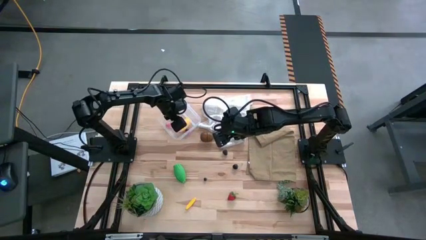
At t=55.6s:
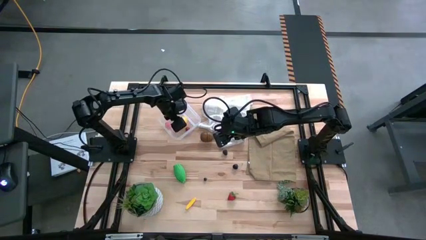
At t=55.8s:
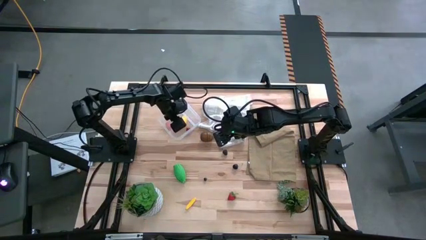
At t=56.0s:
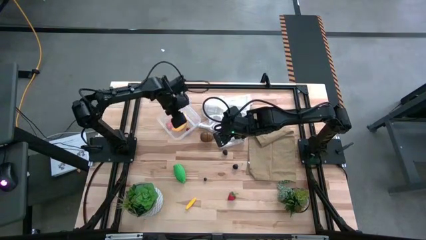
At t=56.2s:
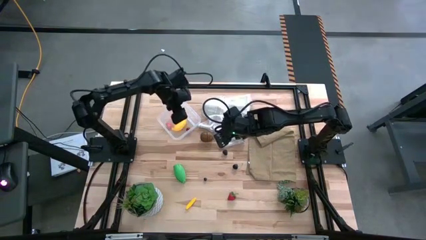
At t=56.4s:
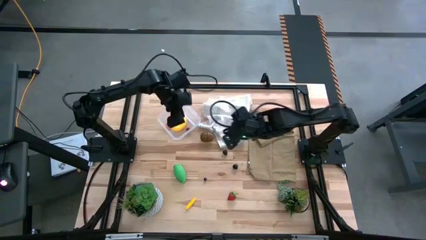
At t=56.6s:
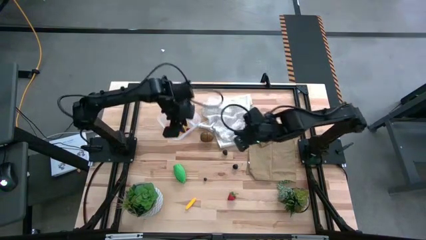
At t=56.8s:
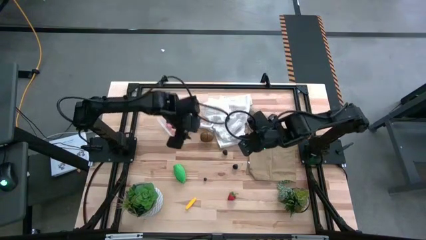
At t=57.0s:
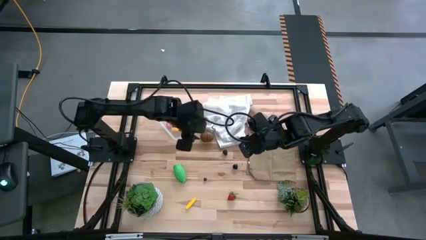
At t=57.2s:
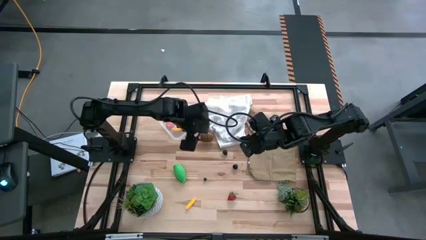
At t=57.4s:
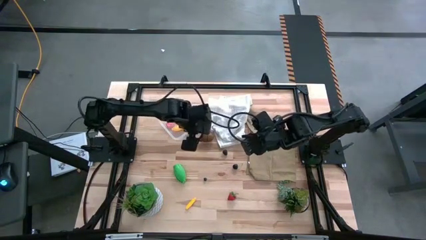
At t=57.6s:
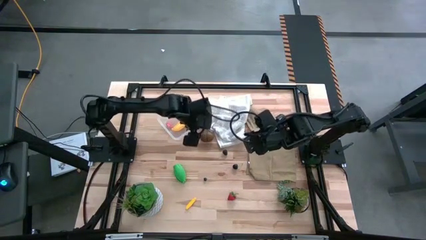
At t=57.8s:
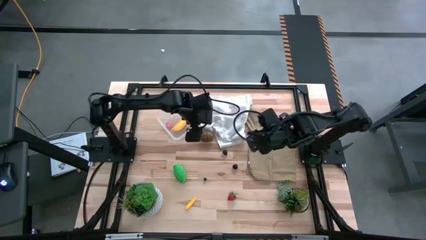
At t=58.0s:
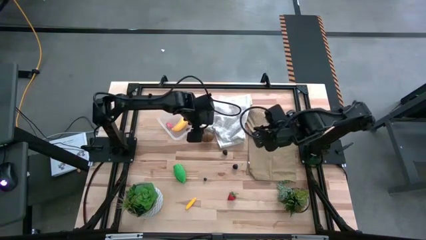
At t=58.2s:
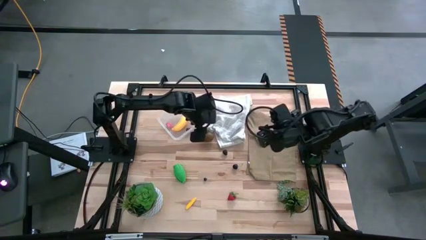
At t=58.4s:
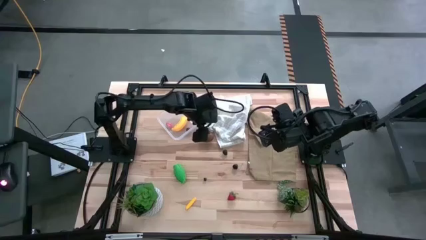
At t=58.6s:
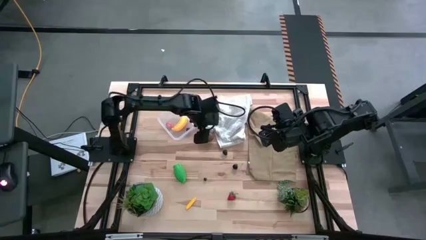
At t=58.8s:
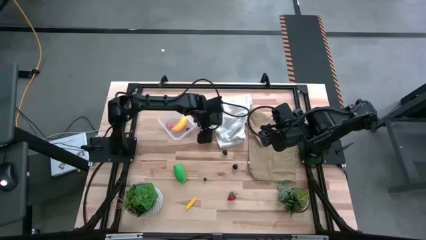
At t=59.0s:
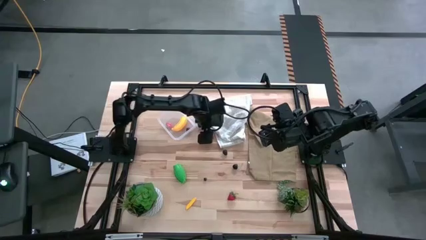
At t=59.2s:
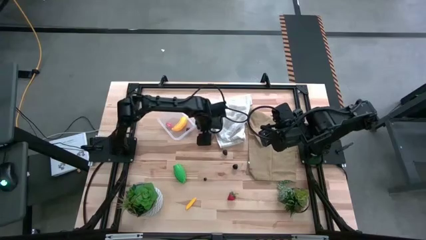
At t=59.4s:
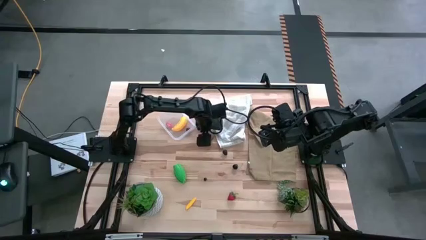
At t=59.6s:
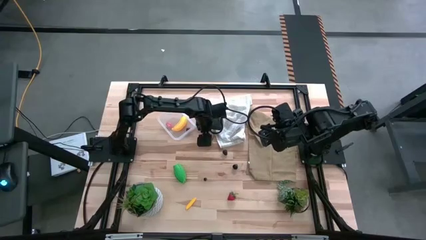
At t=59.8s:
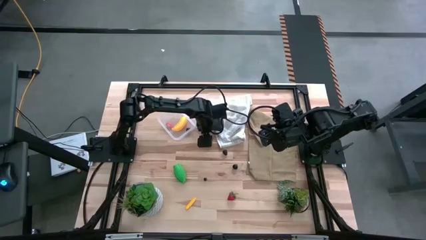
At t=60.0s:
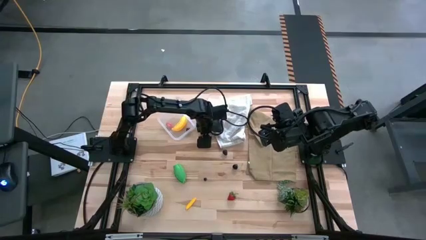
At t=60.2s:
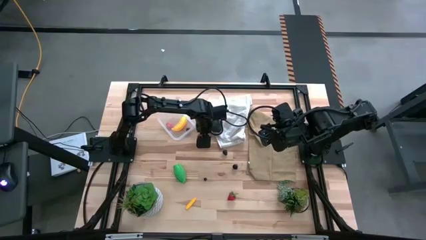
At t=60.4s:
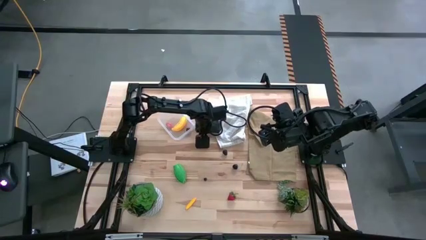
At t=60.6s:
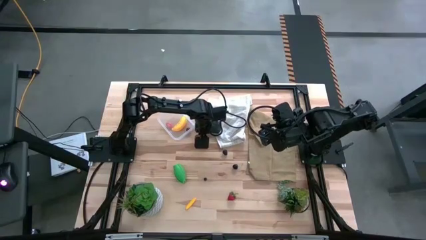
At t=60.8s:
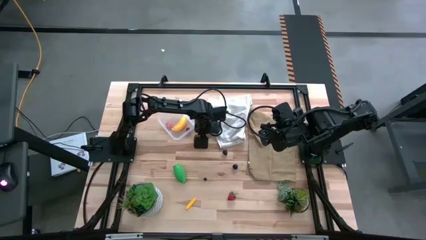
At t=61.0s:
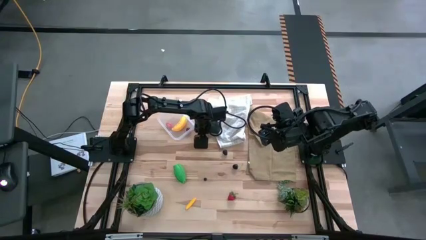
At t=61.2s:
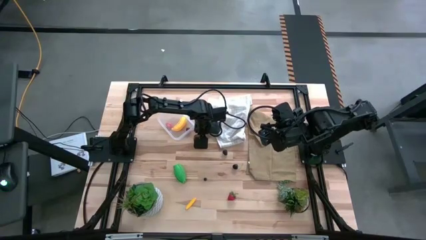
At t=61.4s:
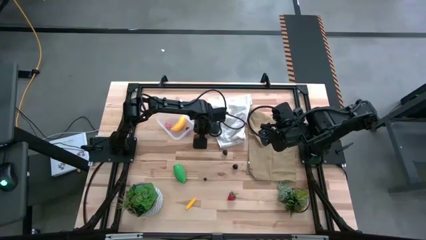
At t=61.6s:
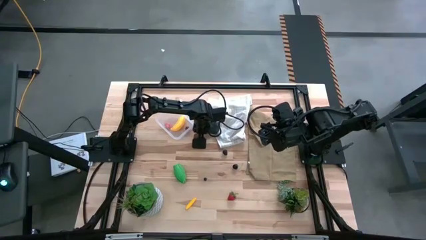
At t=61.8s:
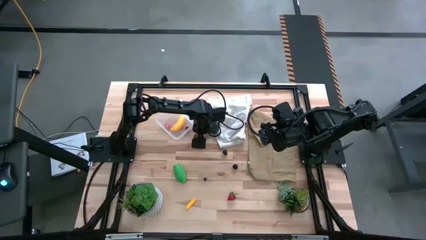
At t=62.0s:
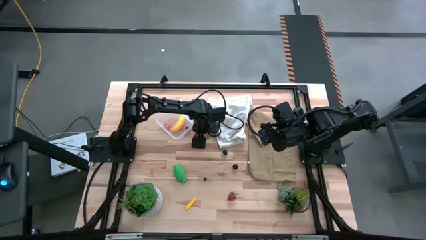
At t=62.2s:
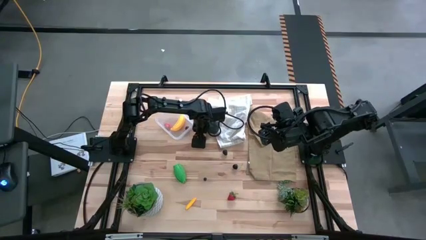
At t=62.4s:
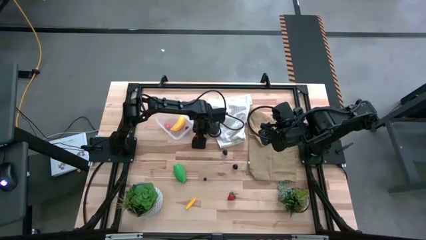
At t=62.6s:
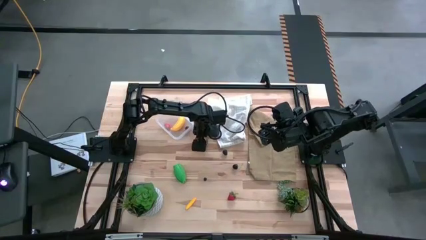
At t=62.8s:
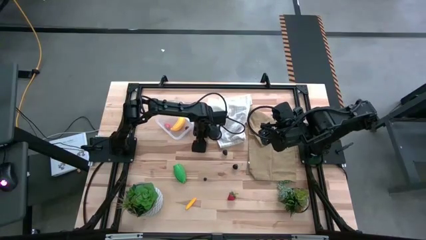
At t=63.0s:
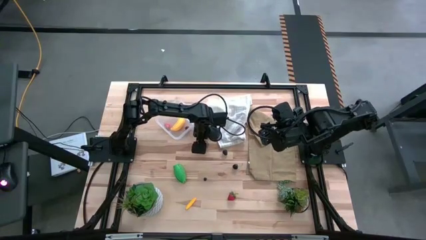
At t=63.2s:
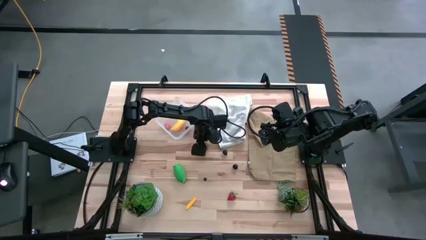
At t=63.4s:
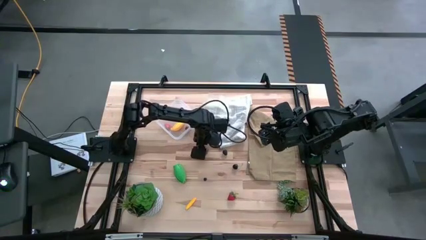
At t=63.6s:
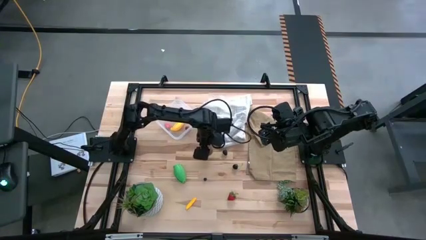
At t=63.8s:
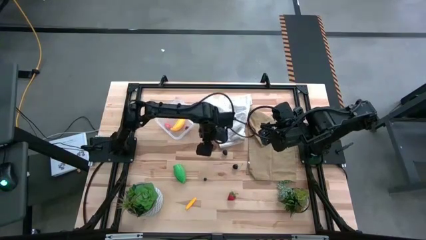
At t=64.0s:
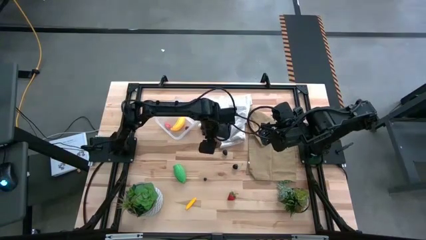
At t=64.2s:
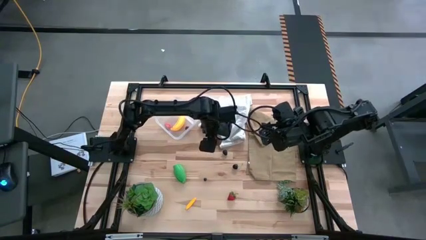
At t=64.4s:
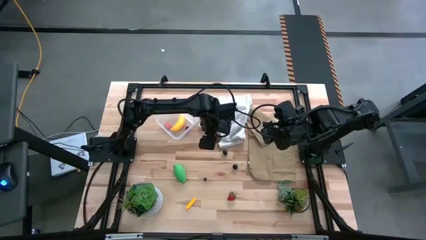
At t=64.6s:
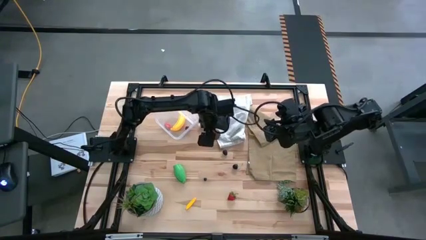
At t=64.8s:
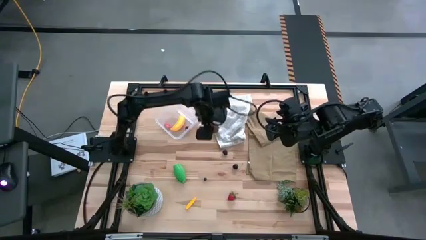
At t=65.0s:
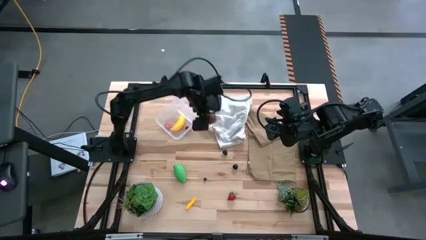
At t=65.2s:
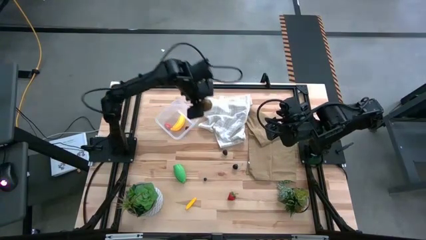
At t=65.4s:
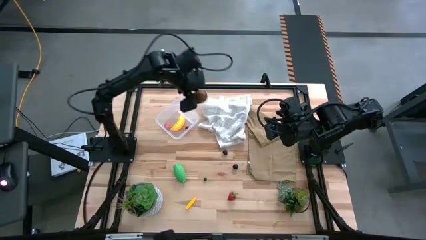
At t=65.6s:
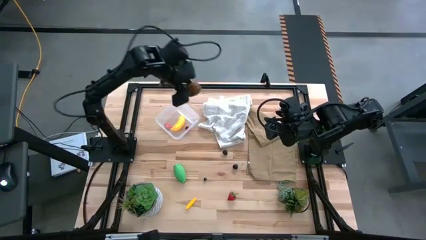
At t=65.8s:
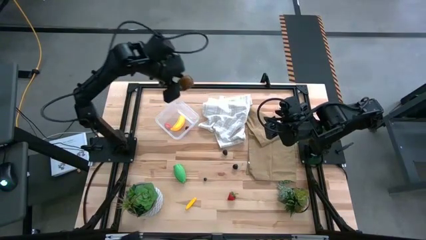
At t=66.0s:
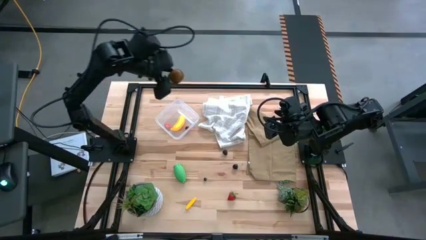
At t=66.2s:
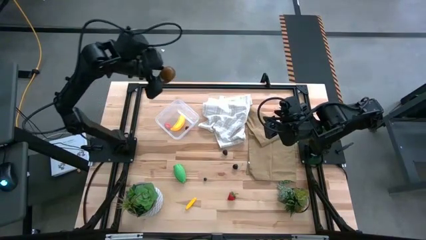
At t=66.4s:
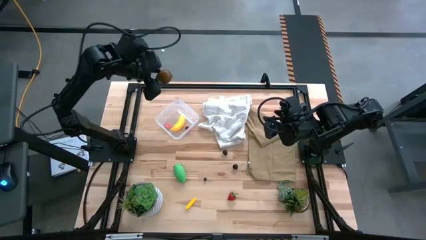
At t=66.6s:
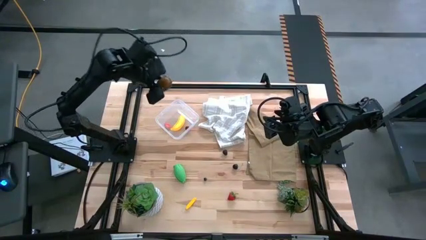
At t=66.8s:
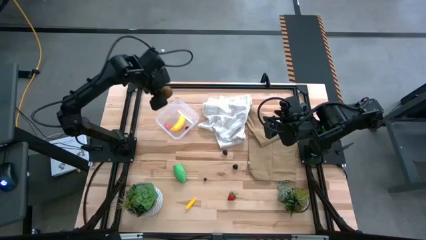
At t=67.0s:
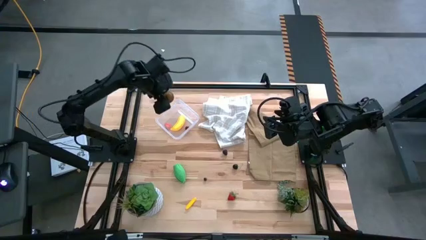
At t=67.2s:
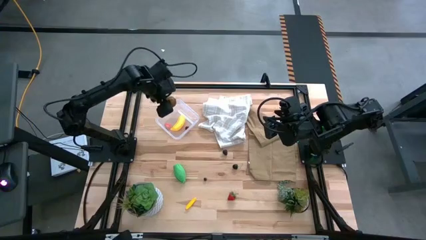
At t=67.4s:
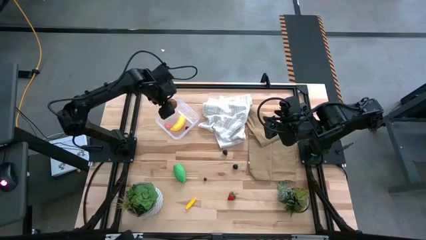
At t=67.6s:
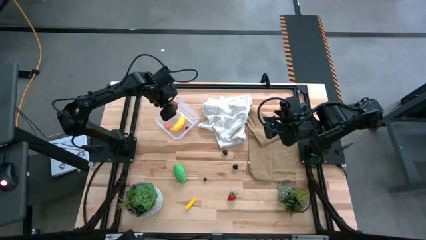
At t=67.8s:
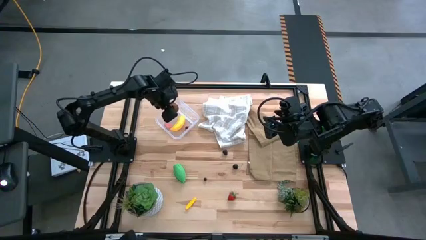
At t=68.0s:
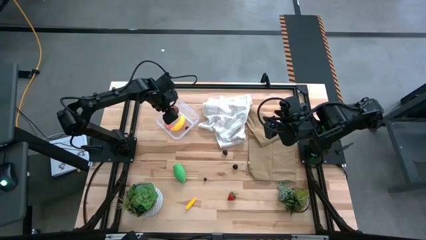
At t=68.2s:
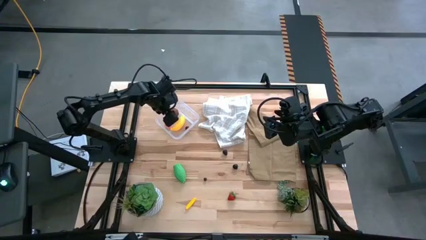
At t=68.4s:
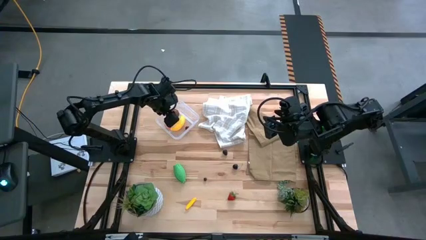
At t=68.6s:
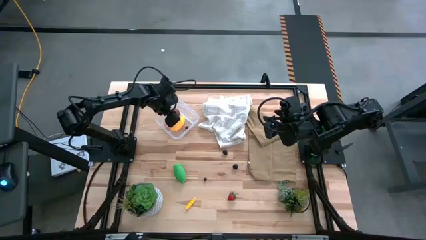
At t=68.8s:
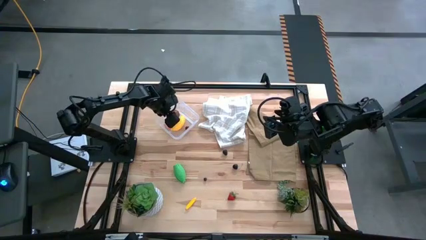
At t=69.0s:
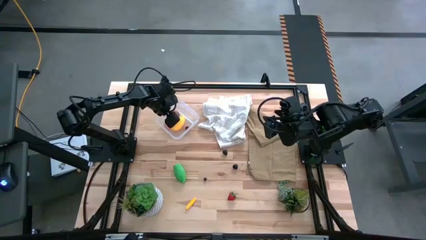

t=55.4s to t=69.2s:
Task: Pick and placing Produce into tupperware
Put the brown kiwi into the transparent bin

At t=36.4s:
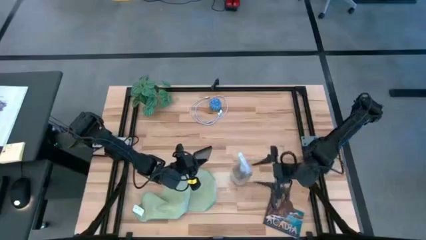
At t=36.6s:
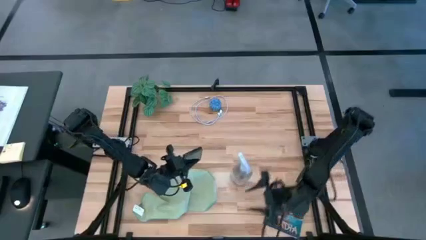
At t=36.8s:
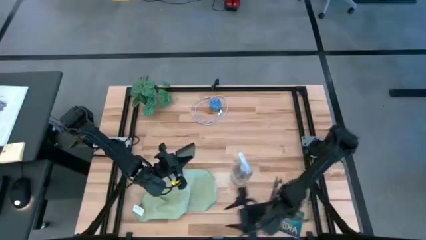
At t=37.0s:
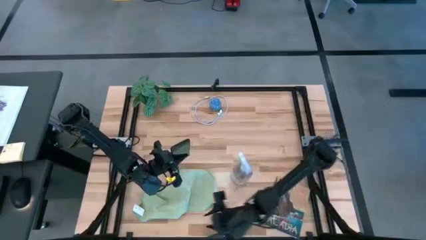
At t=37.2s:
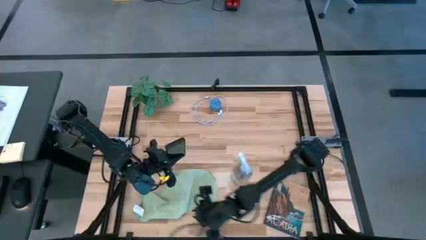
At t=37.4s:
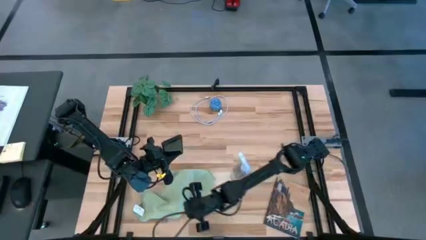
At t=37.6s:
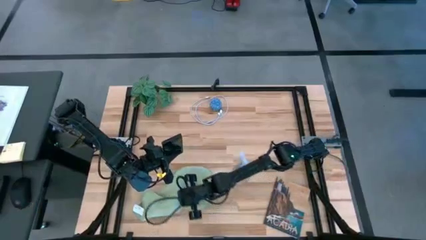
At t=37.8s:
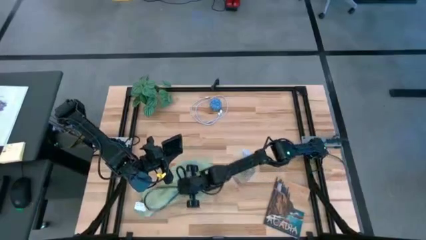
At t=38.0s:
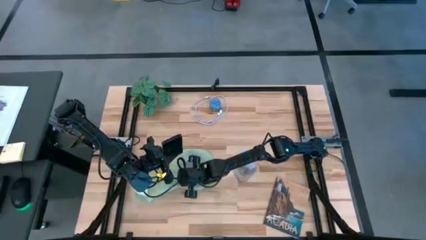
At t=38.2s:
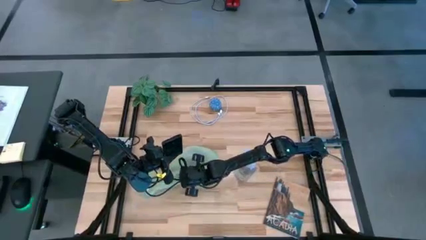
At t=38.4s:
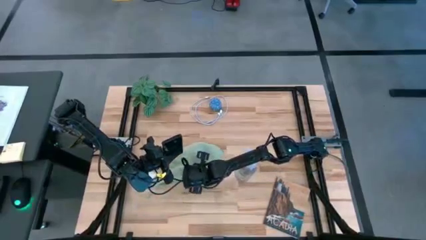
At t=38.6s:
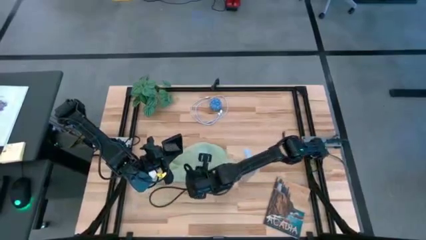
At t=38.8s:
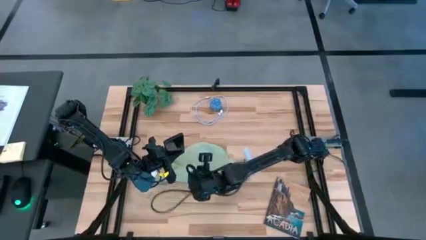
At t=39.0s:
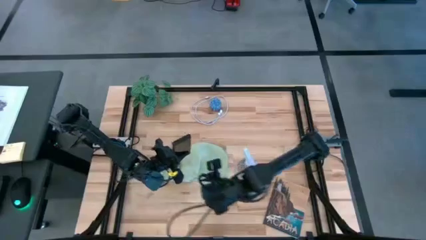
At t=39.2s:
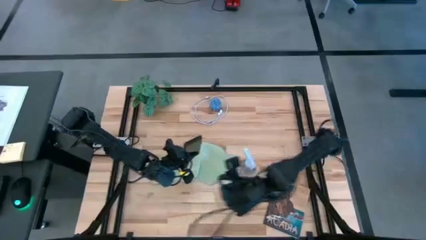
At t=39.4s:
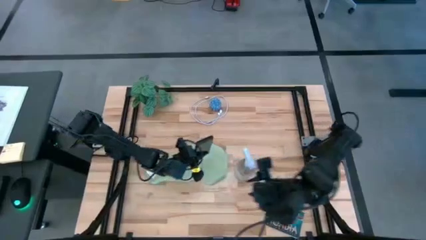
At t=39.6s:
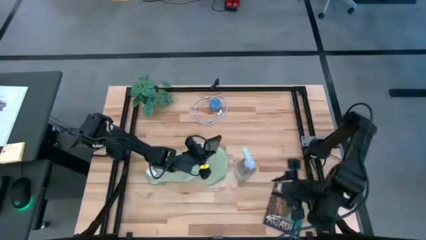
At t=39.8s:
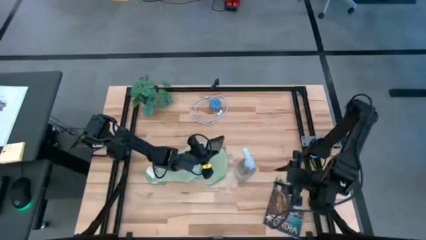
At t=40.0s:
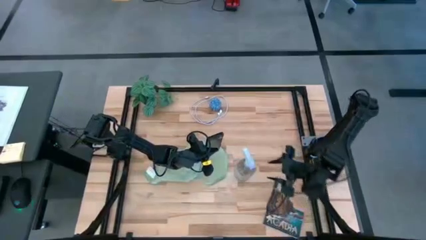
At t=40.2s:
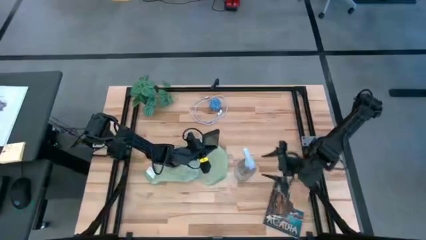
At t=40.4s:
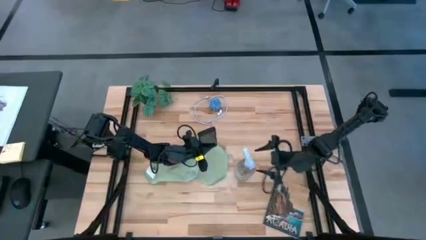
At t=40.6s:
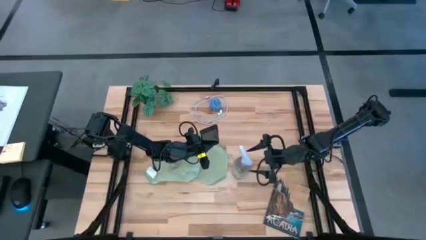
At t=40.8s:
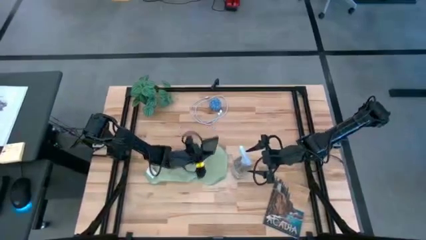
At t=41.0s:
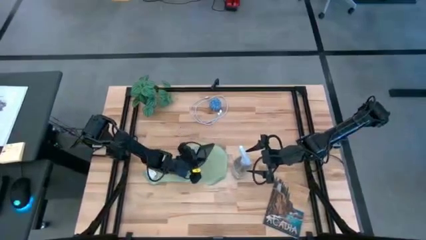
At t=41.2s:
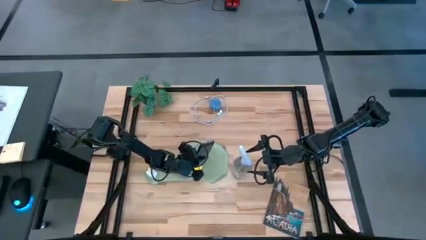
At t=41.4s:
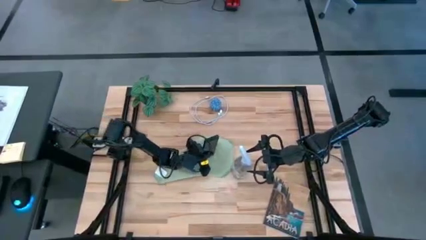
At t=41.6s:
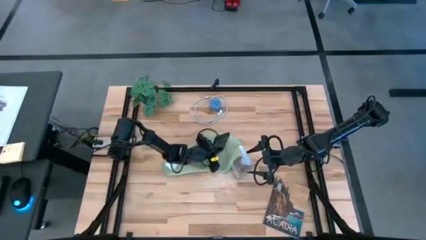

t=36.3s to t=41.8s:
Task: Apply microfiber cloth
Adjust the light green microfiber cloth
